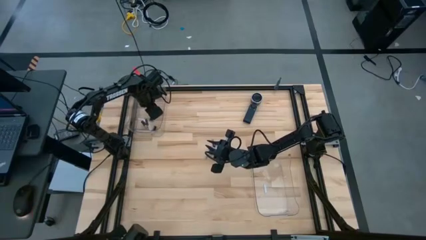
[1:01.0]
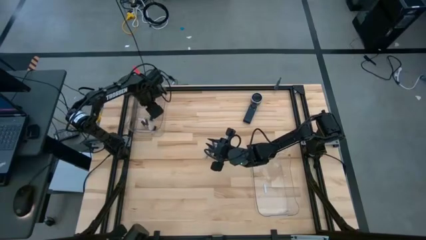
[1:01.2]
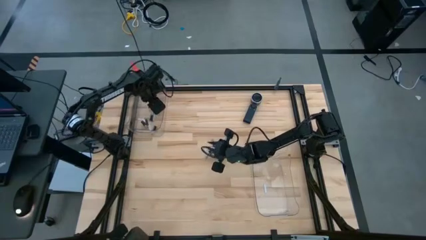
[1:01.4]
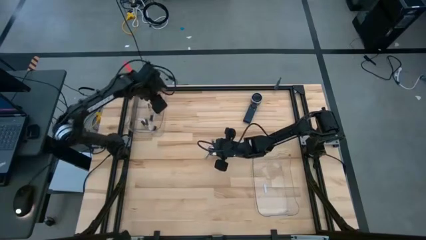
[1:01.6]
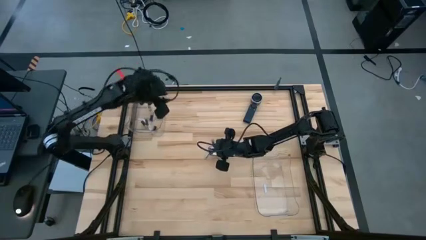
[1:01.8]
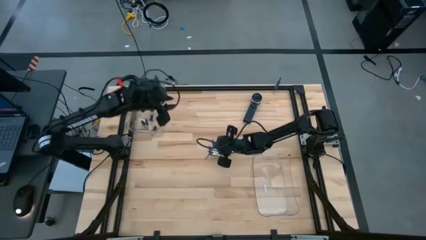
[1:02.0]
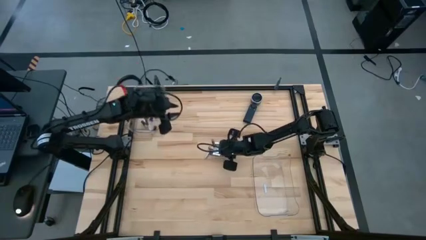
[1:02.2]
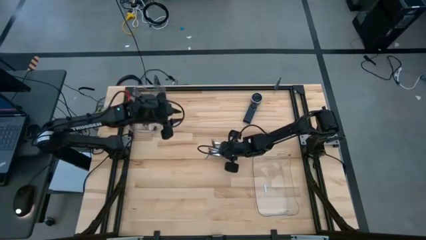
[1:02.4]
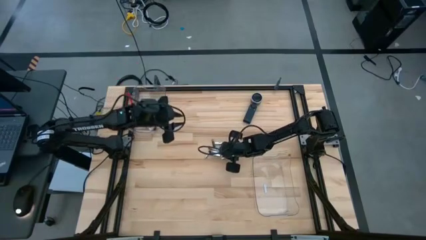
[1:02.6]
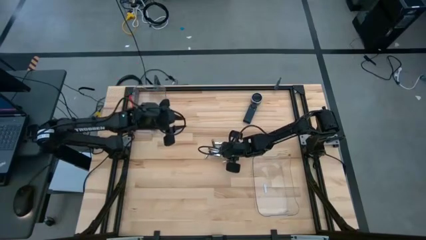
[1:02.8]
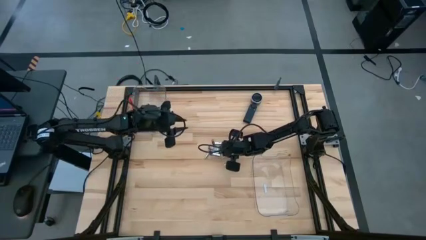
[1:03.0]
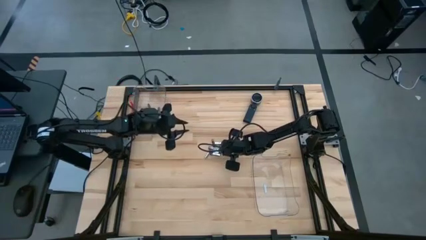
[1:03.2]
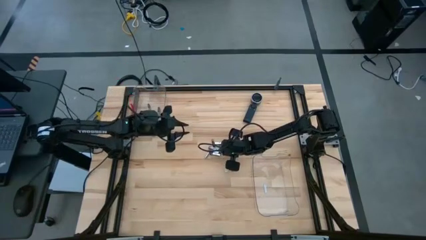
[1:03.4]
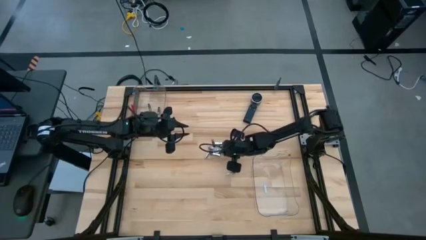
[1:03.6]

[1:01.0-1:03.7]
Task: Sort batteries
Put the bottom black battery into the top transparent bin

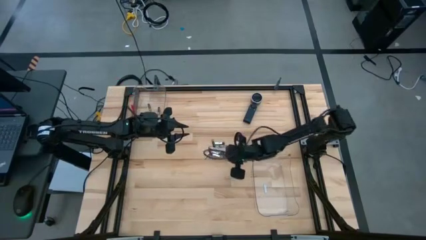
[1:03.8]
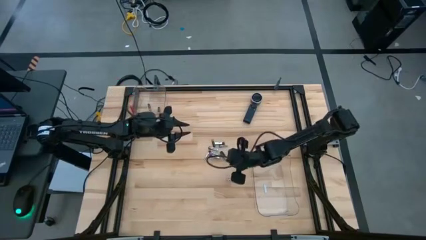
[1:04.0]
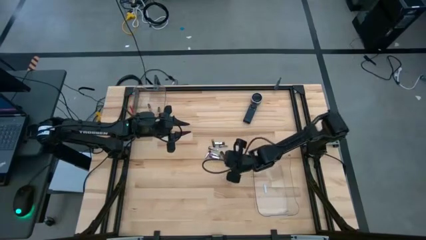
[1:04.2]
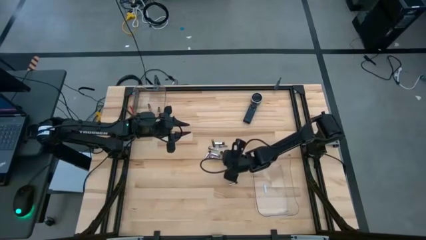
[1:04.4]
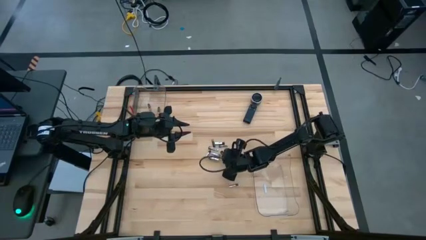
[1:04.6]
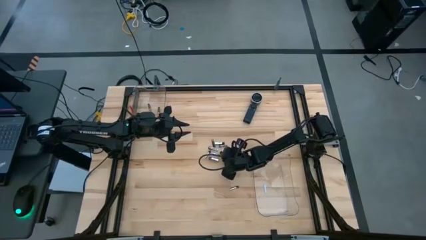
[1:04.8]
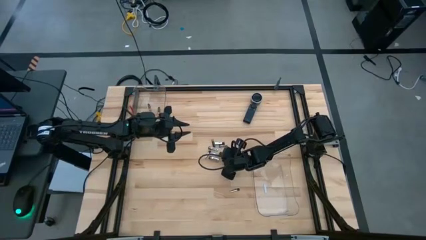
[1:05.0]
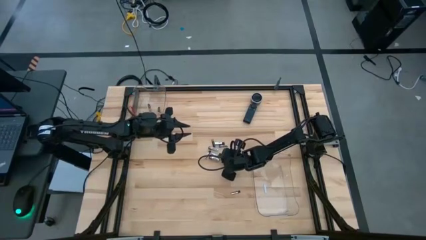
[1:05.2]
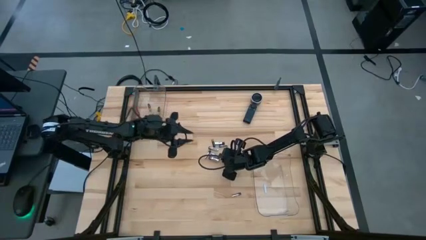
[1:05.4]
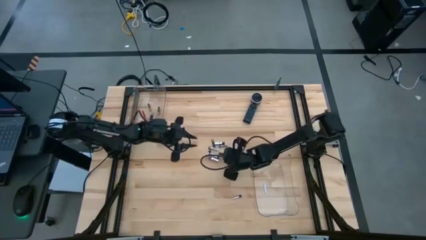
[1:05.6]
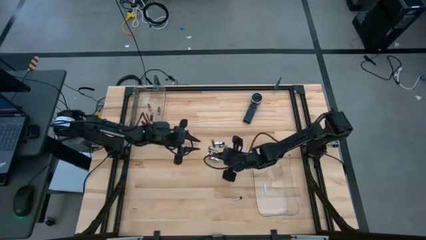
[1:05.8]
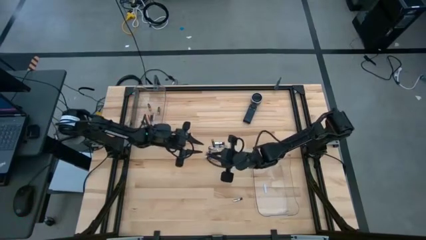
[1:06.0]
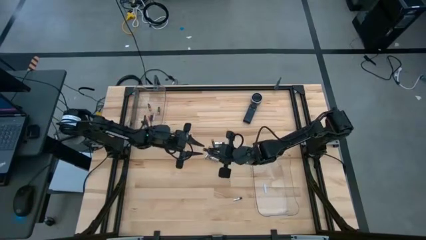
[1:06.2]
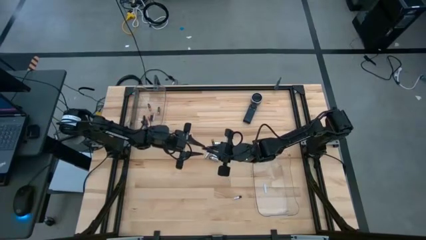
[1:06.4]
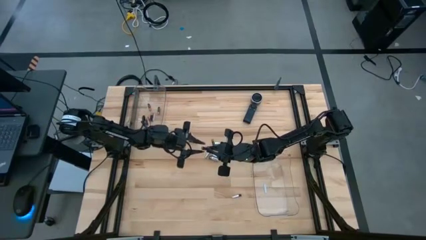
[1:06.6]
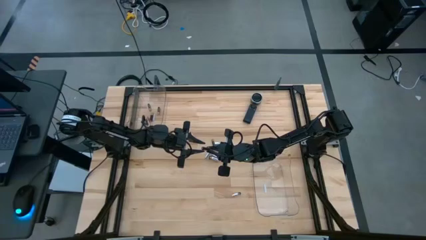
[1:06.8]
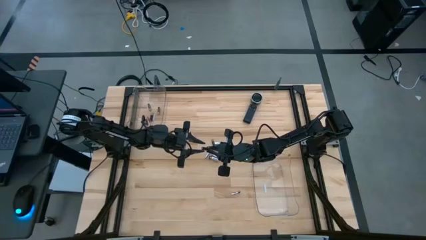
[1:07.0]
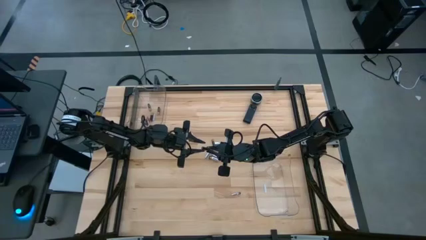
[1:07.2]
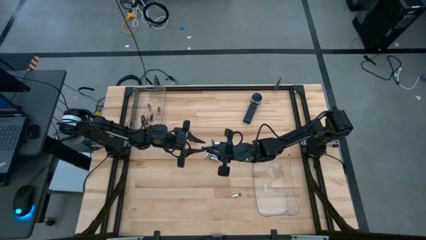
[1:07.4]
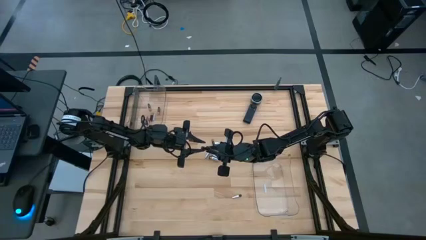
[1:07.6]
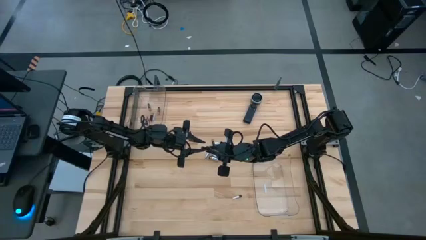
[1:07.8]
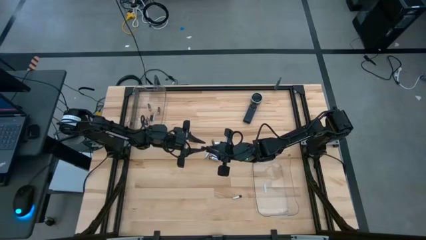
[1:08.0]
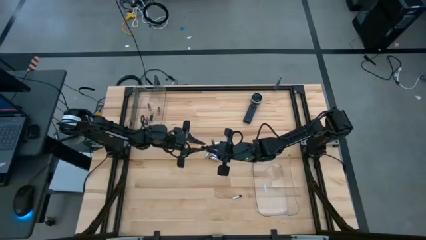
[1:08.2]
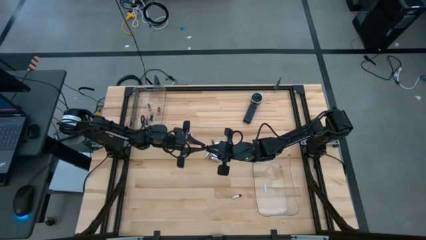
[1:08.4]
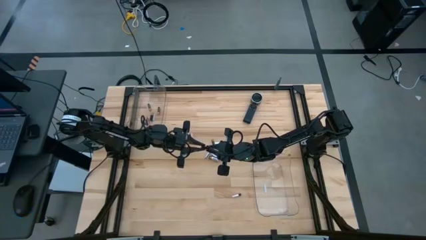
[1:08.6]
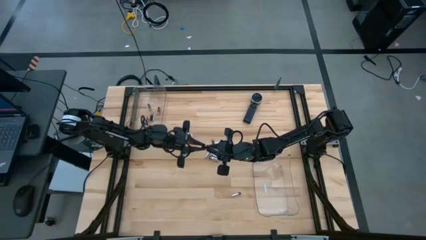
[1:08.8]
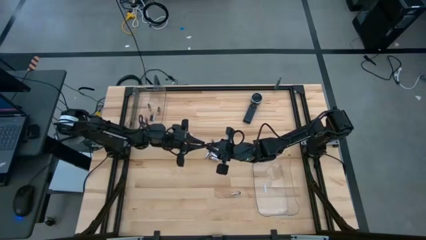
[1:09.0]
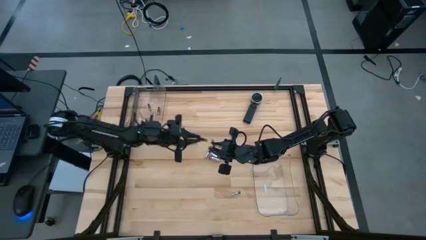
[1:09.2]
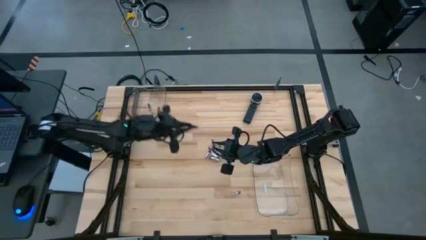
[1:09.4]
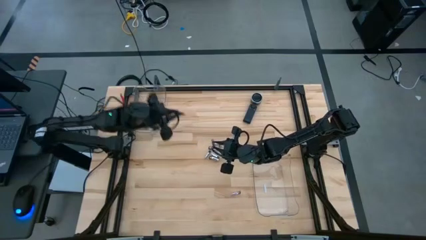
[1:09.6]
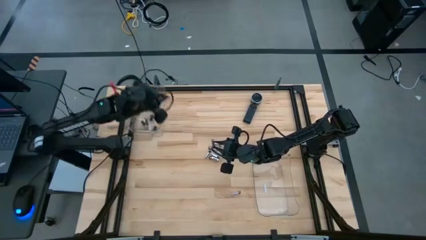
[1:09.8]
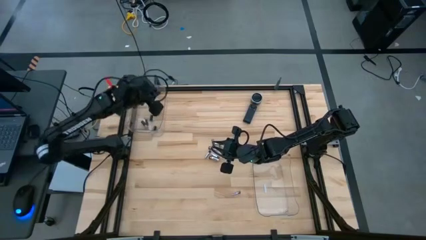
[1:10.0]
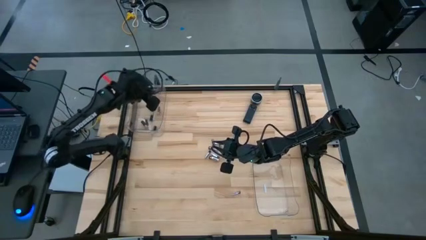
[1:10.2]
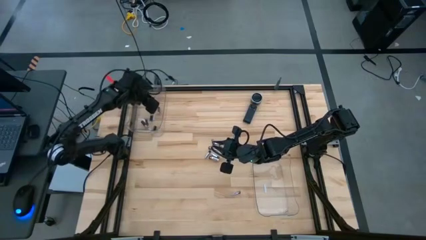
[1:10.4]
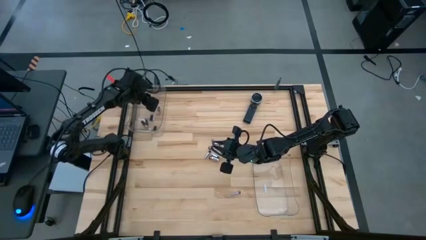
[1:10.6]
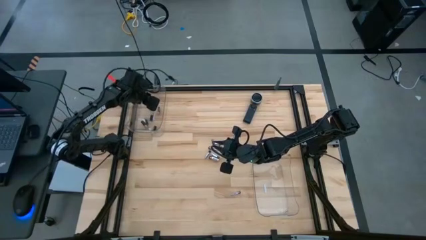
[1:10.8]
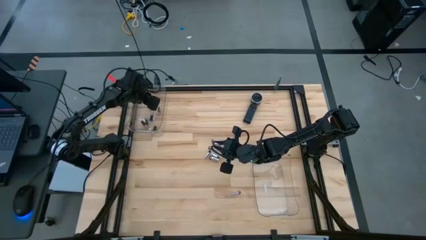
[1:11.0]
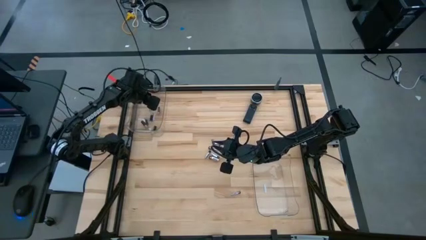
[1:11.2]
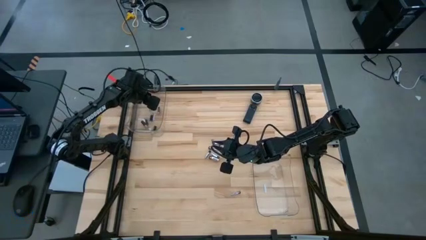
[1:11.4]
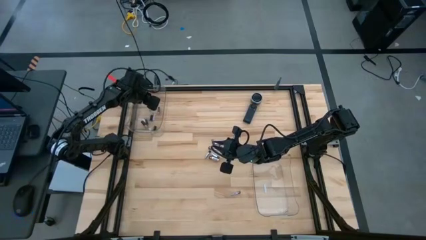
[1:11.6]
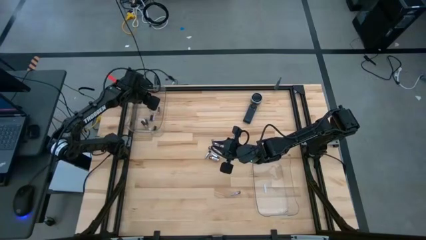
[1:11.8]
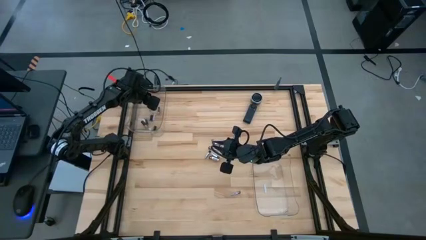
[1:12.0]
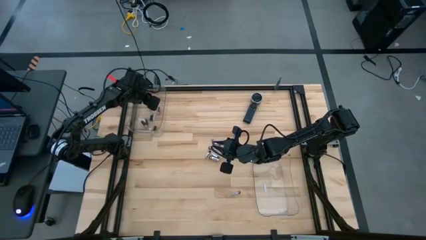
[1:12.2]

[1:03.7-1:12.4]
Put the bottom black battery into the top transparent bin

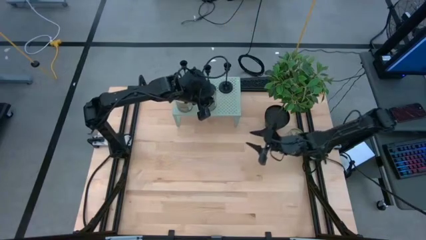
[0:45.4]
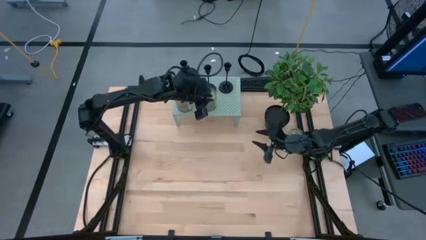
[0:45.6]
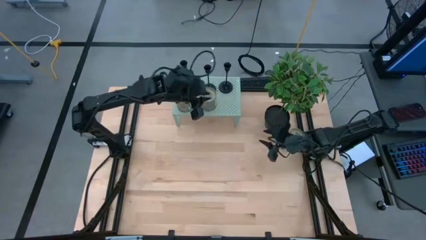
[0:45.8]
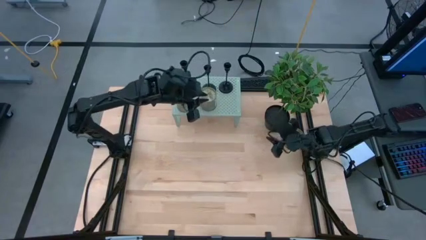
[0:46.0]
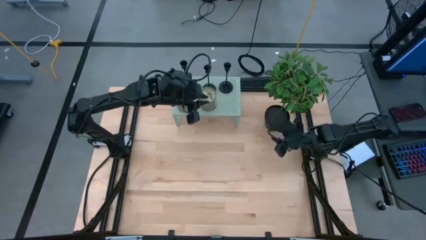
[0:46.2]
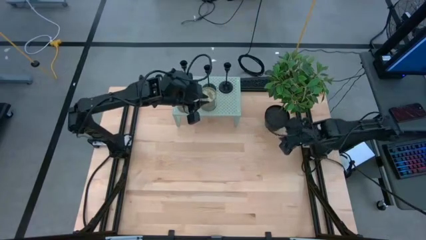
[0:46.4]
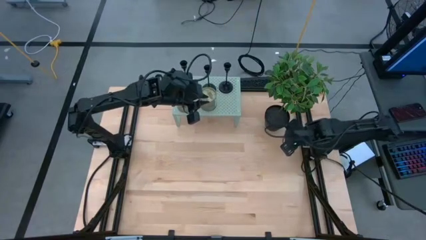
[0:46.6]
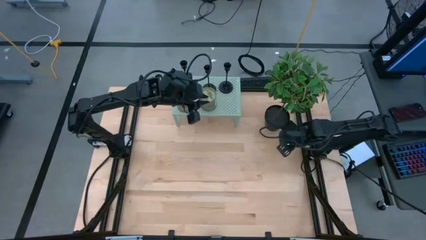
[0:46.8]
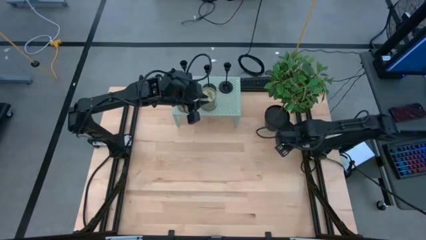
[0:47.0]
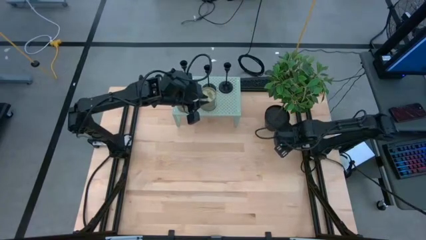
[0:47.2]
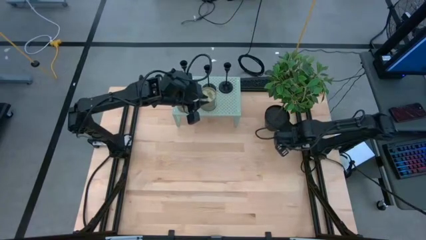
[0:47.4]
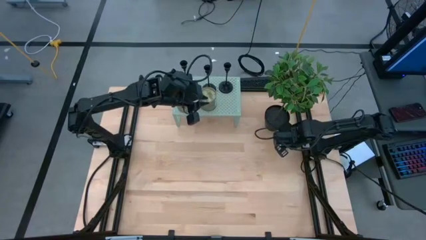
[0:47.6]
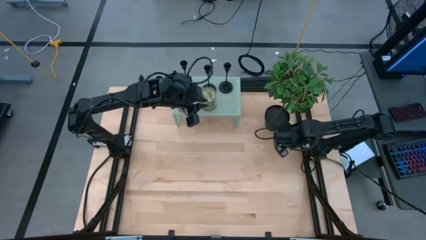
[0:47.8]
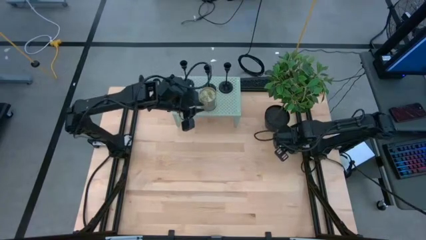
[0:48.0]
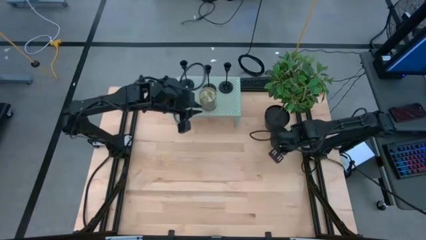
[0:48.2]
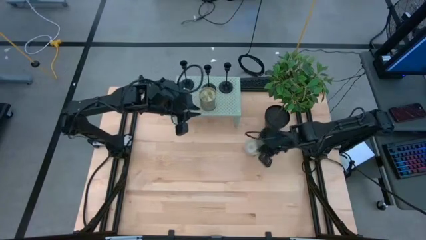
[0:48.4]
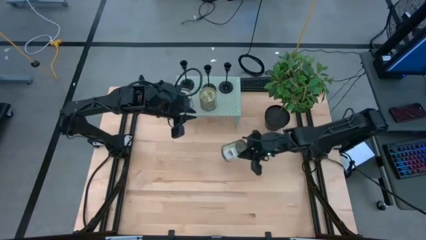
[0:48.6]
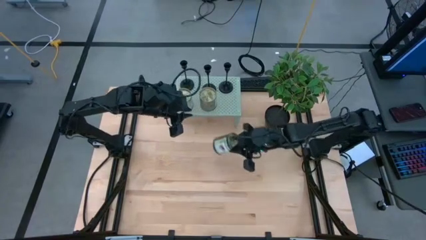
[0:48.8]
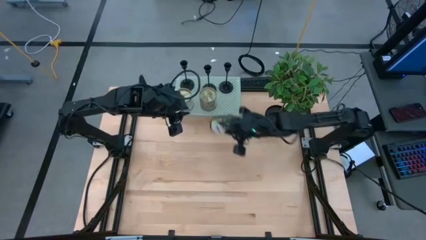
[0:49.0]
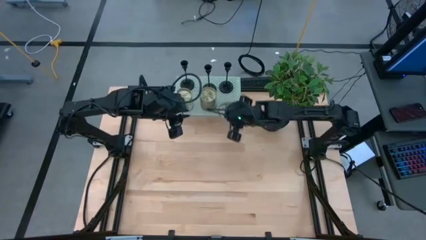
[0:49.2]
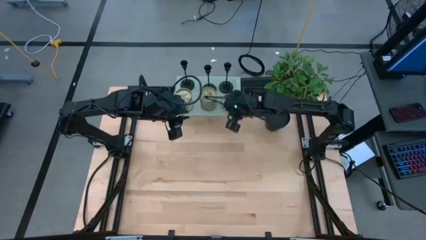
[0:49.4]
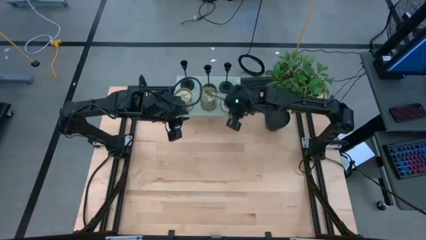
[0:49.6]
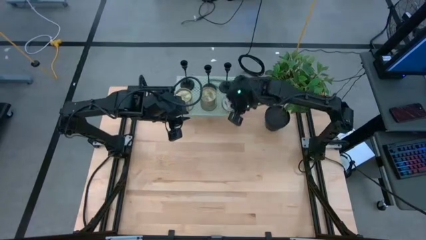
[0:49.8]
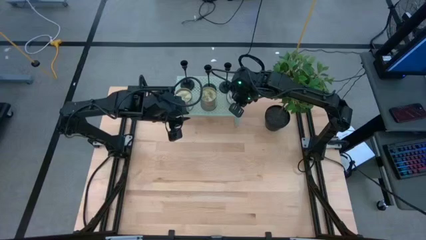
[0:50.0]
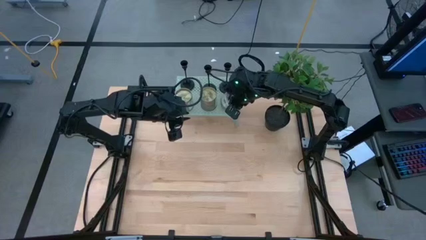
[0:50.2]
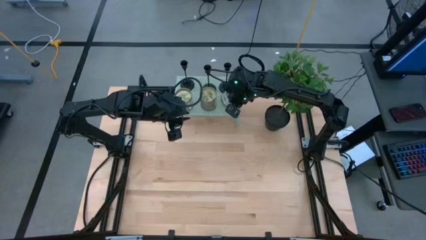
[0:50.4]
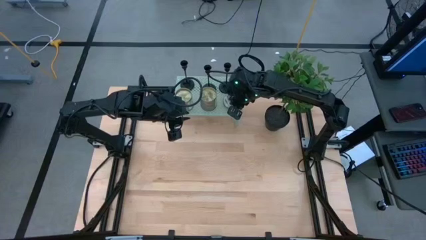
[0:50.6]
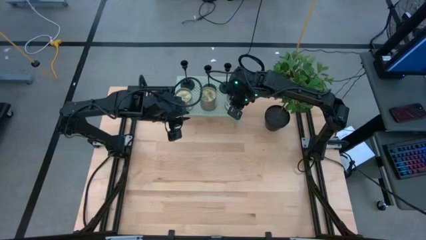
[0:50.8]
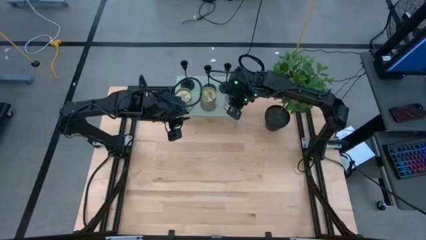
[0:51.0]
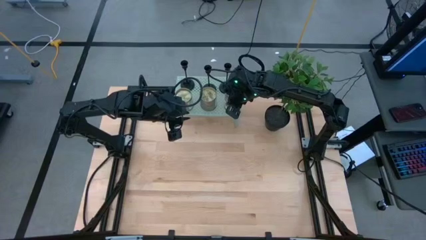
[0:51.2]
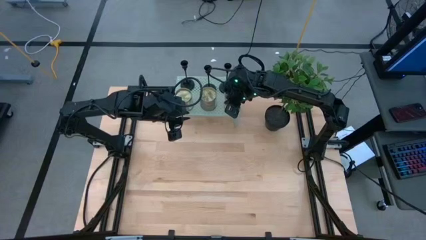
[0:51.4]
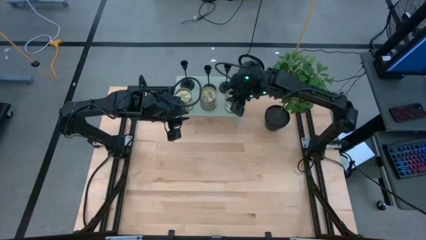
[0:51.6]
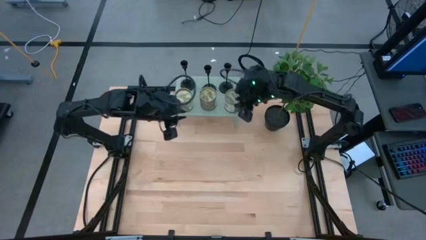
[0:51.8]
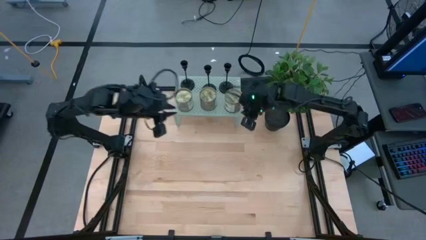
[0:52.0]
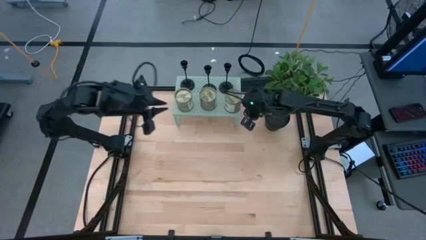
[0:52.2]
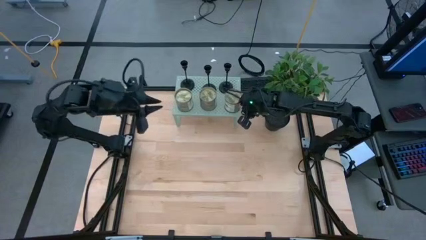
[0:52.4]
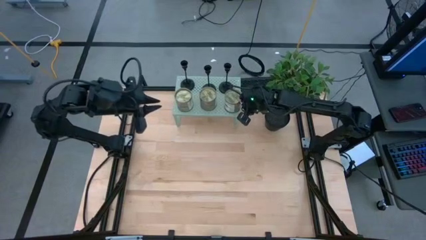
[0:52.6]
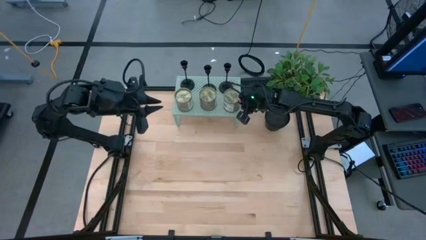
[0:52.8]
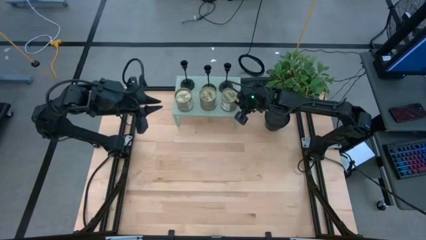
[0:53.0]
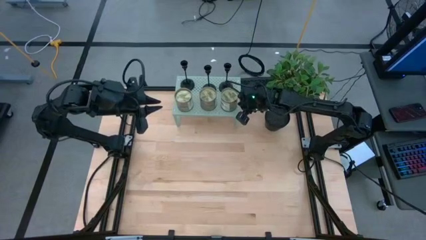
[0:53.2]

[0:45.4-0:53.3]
Task: Pick & Place candle stick holders
Put the scented candle on the shelf
